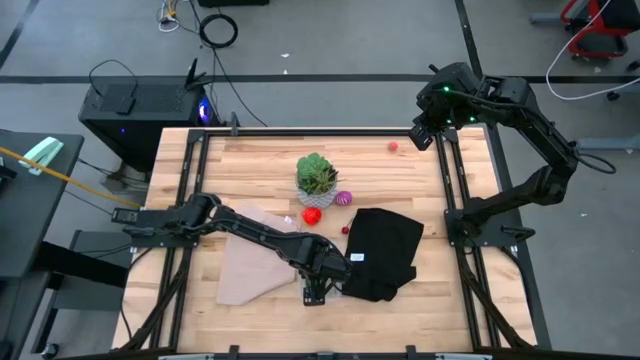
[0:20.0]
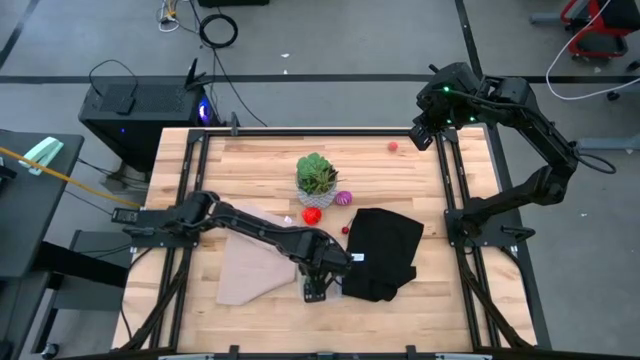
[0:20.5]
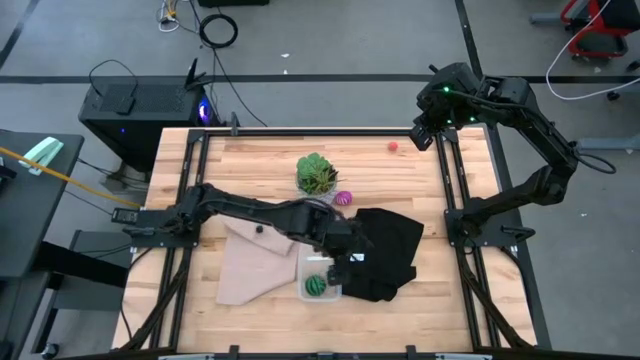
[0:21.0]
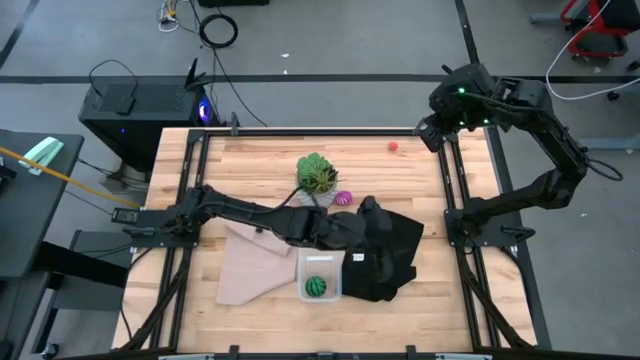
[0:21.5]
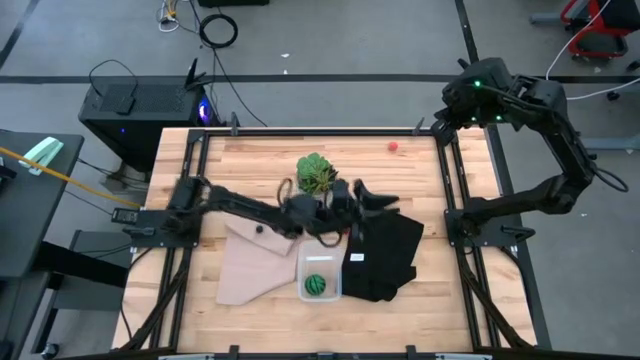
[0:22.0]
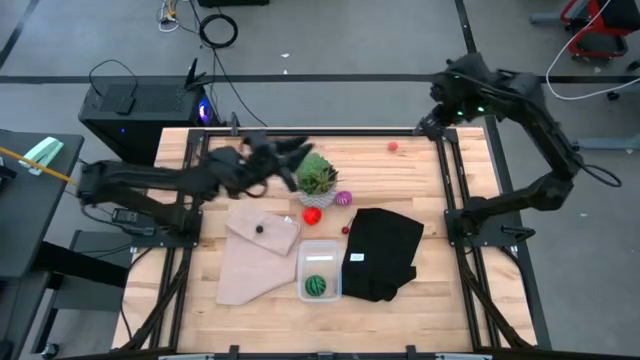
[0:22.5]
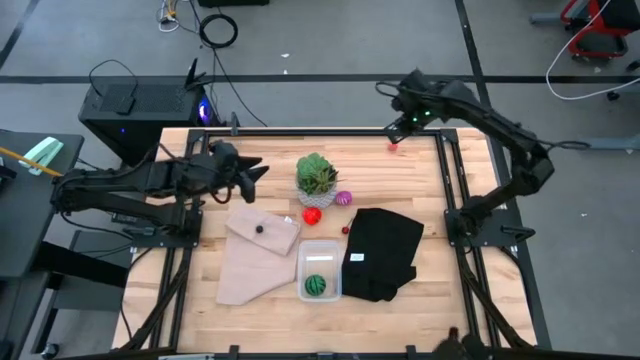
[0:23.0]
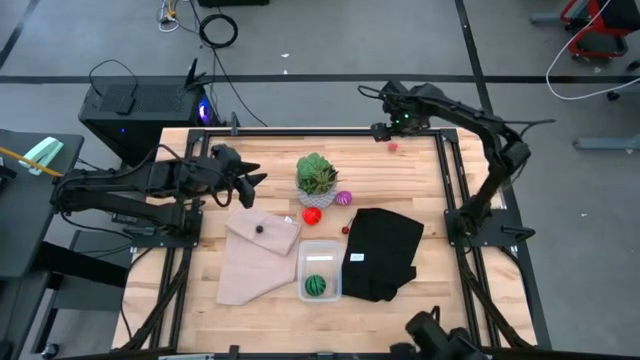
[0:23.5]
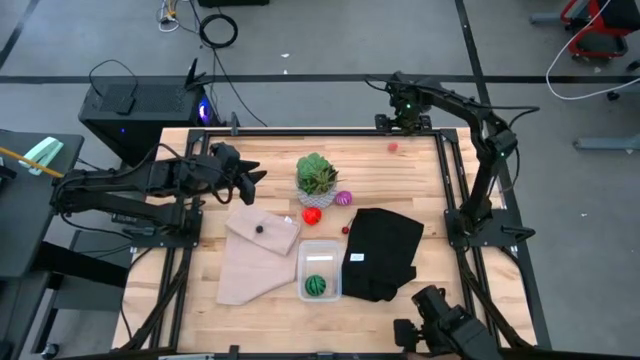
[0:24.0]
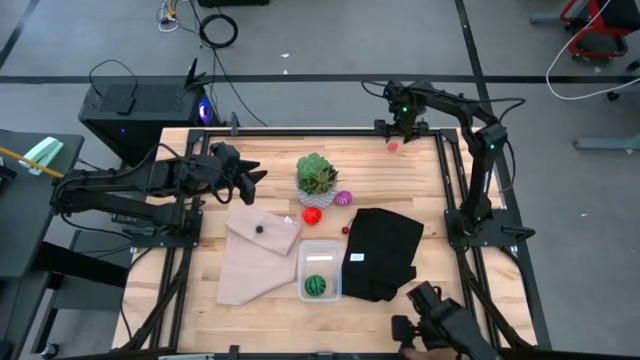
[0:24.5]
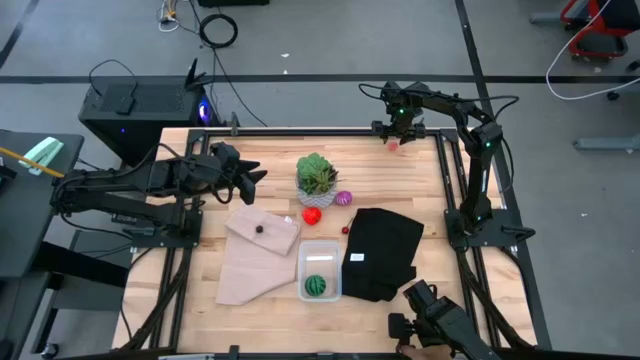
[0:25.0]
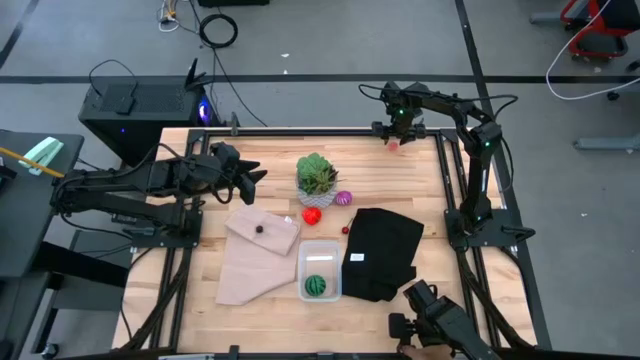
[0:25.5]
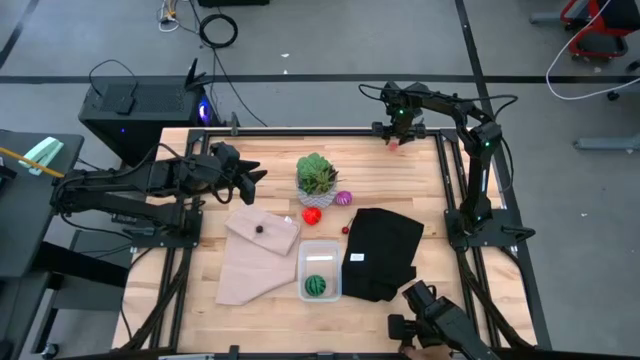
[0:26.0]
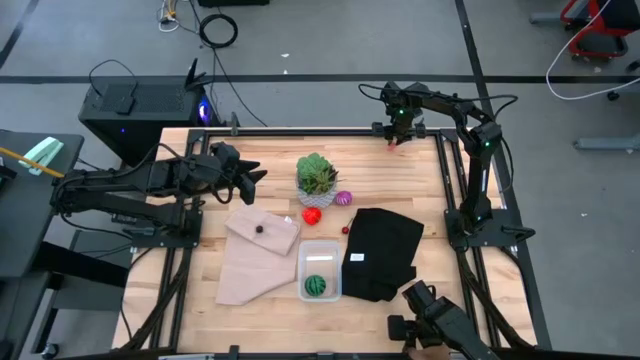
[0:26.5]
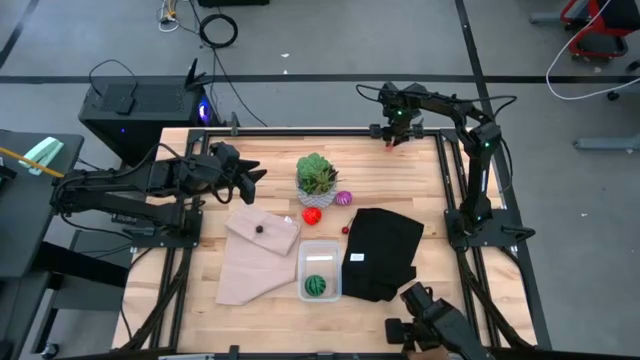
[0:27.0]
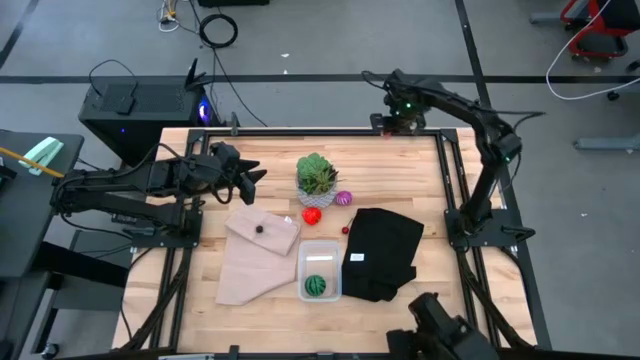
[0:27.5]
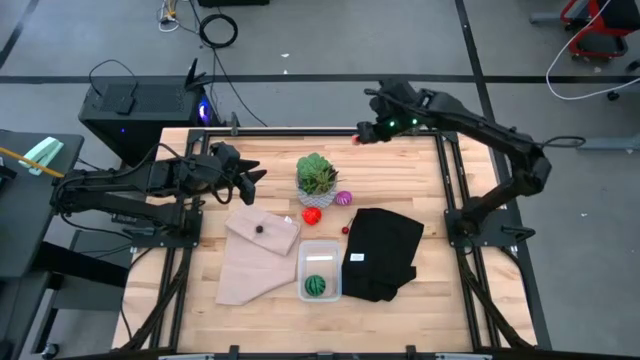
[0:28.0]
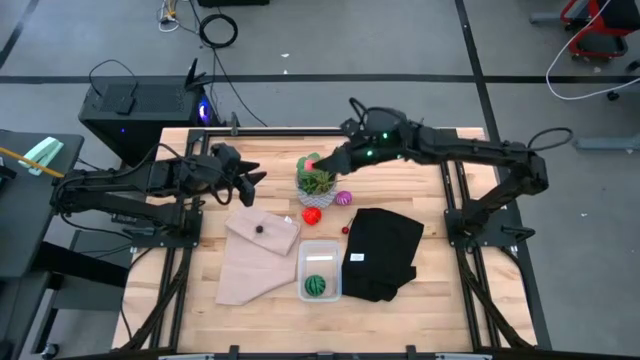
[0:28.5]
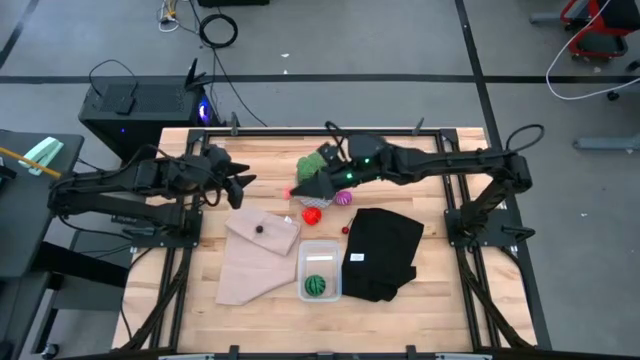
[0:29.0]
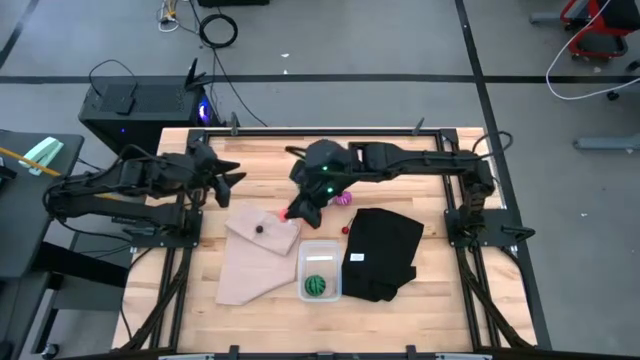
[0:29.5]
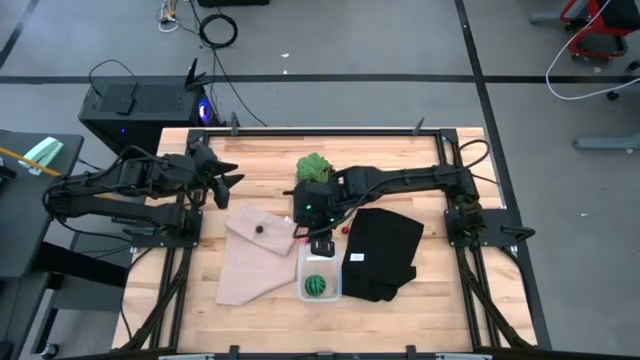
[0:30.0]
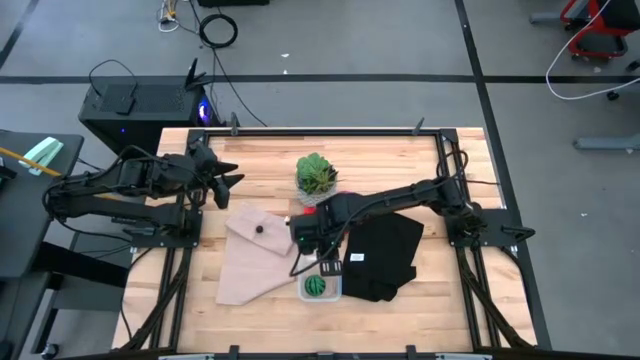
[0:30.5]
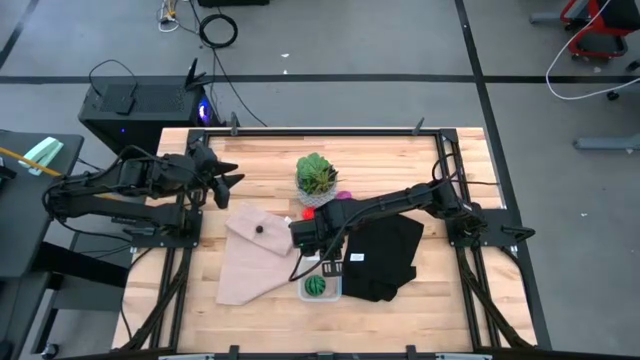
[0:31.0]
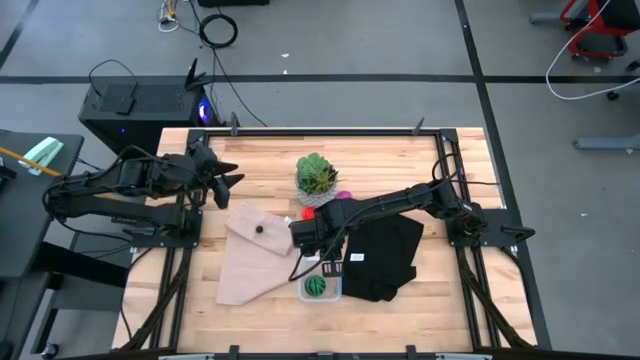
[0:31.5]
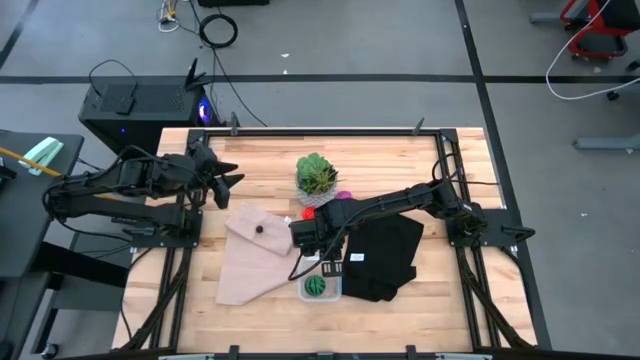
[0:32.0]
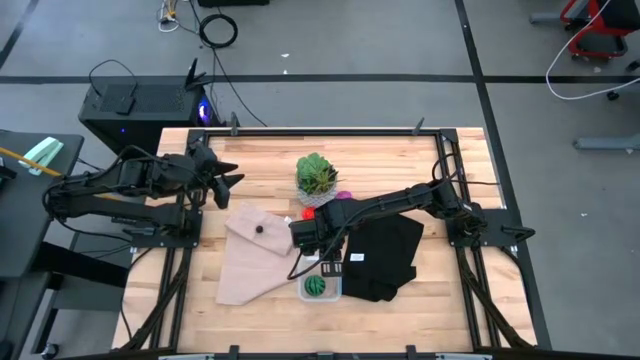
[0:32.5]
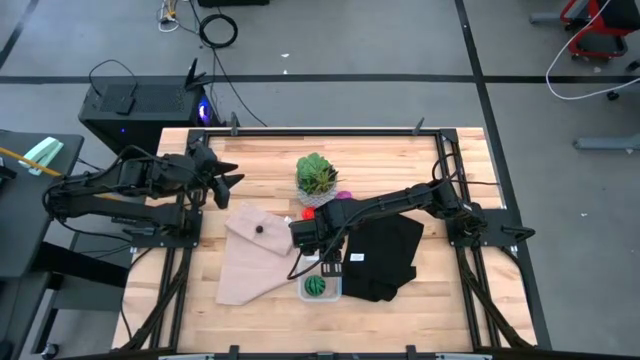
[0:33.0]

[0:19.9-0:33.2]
Task: Pick and placing Produce into tupperware
Put the pink peach into the transparent container

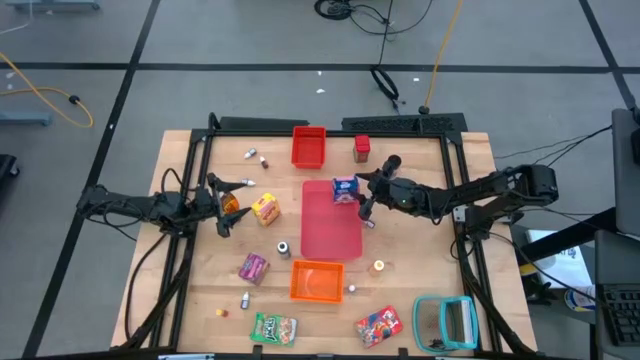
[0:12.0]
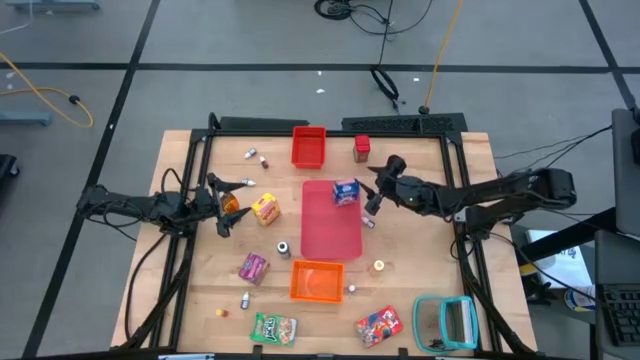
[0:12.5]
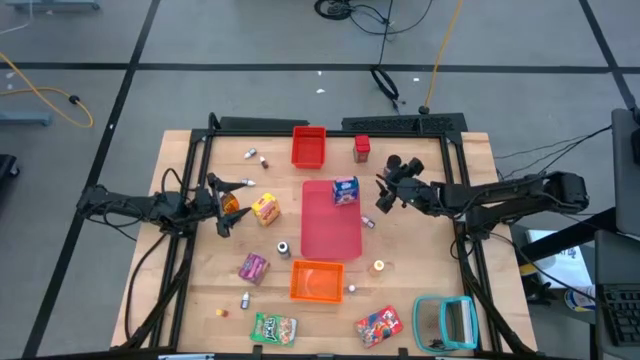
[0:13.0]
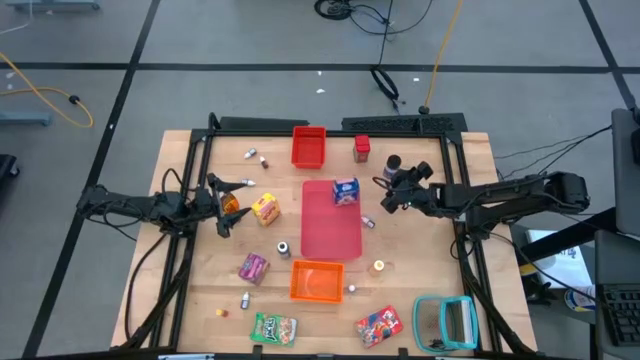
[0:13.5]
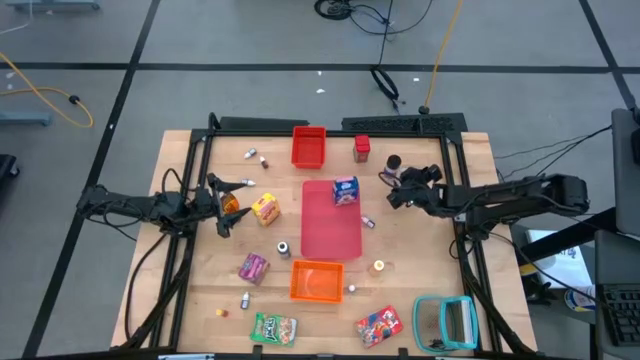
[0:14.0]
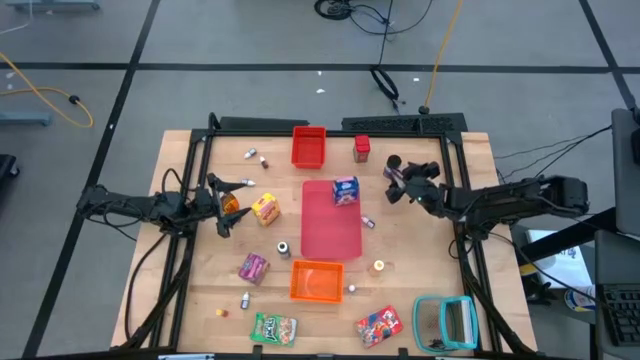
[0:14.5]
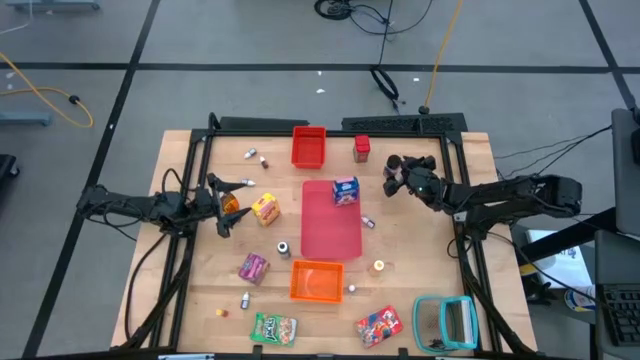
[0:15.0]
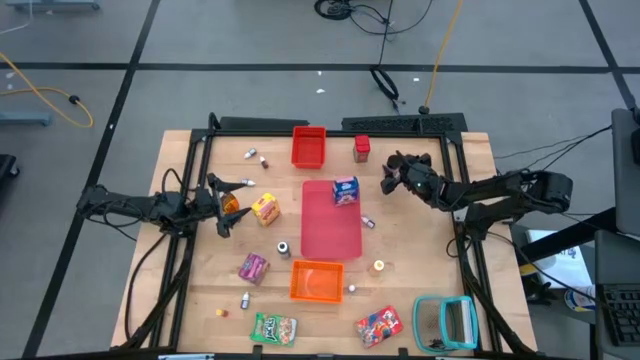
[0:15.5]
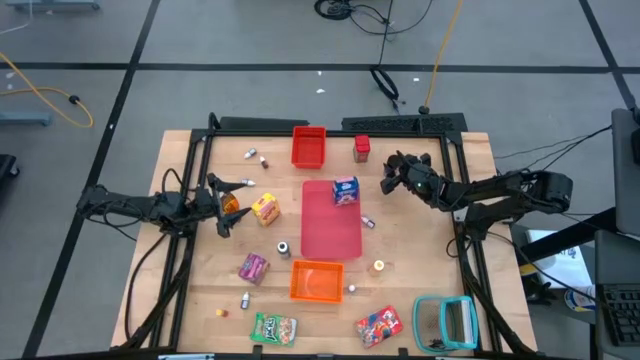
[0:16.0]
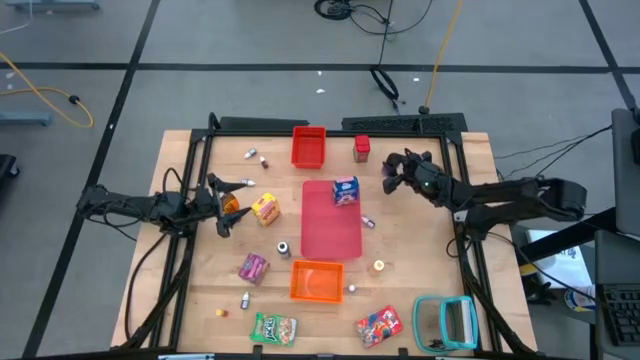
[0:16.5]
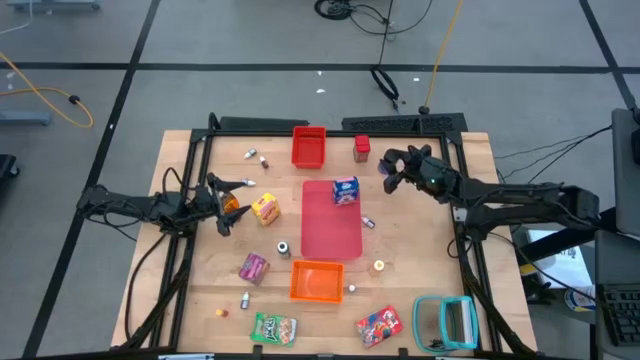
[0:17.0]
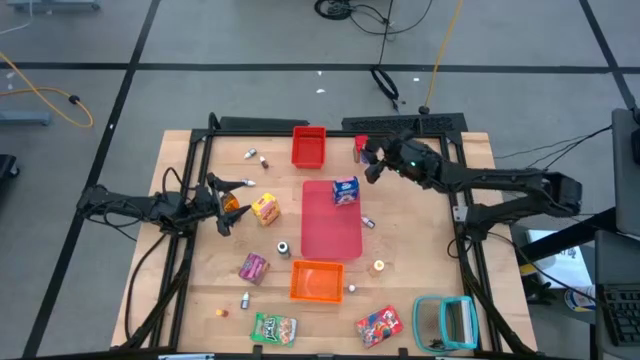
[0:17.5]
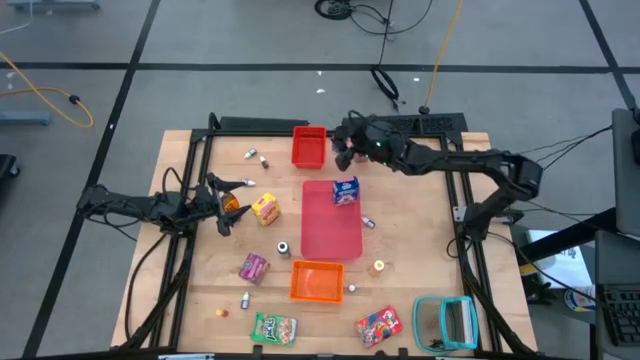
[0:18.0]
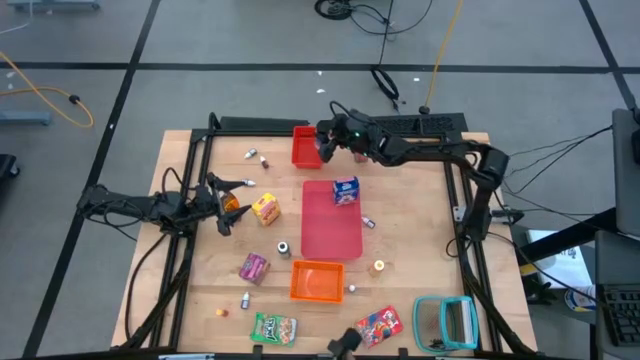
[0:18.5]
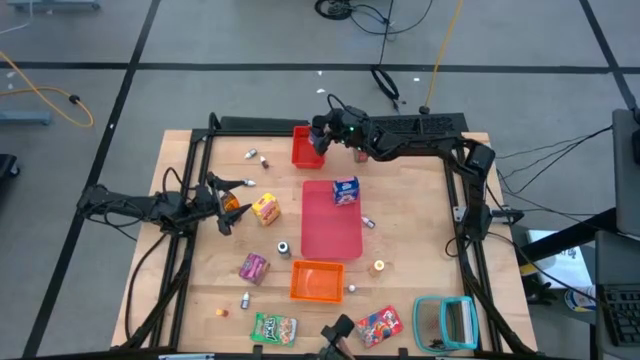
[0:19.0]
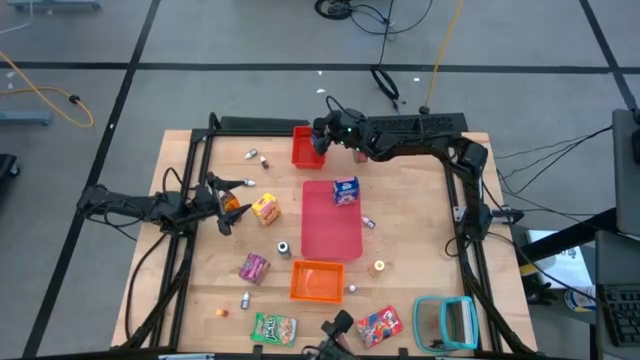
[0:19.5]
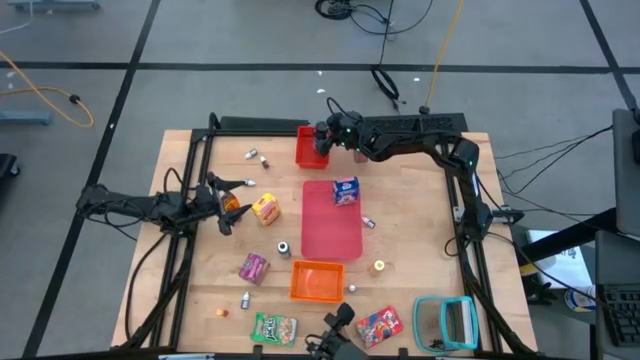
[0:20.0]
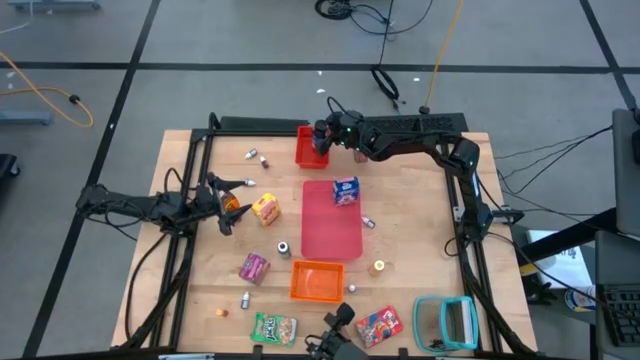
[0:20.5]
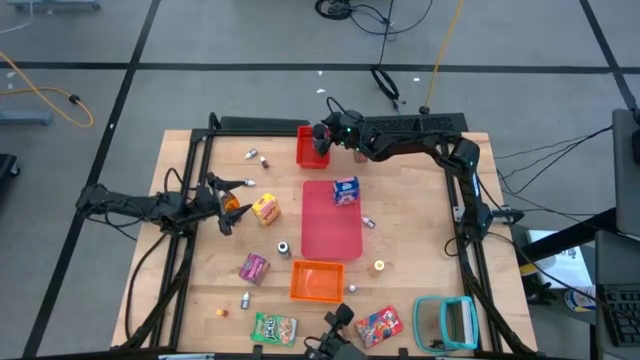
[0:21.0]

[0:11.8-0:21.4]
Task: Pick & Place Kitchen Items
Put the violet seasoning bottle into the red bin
